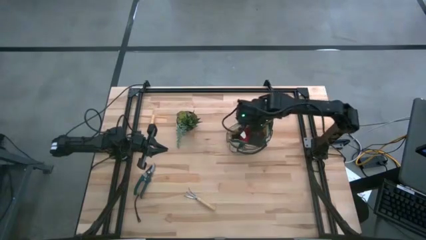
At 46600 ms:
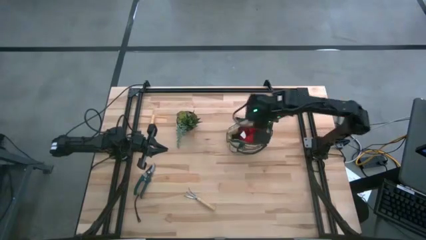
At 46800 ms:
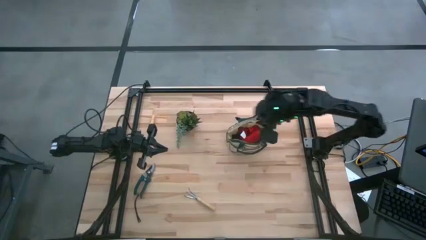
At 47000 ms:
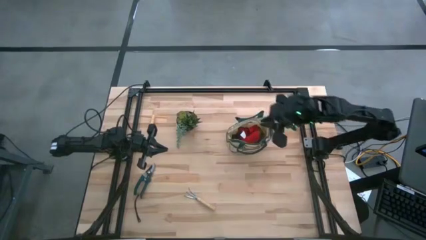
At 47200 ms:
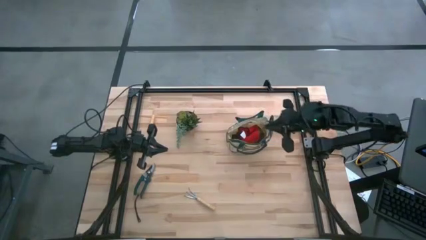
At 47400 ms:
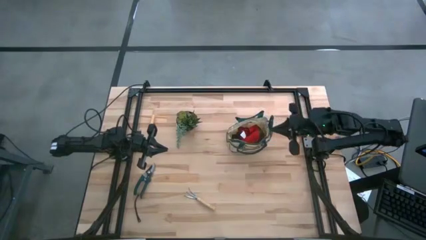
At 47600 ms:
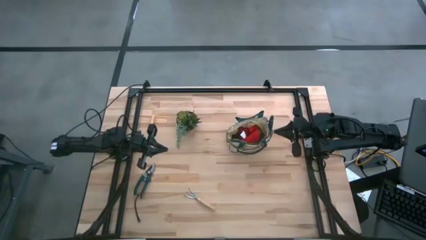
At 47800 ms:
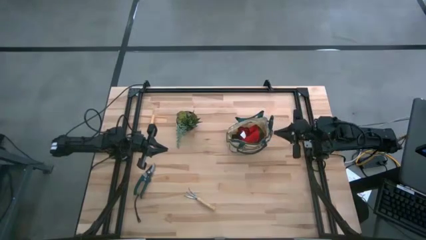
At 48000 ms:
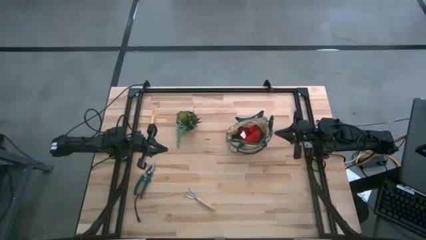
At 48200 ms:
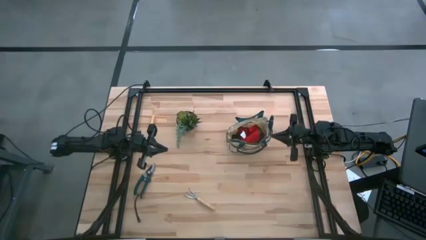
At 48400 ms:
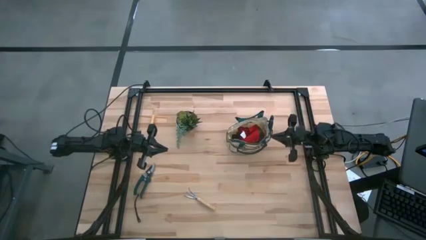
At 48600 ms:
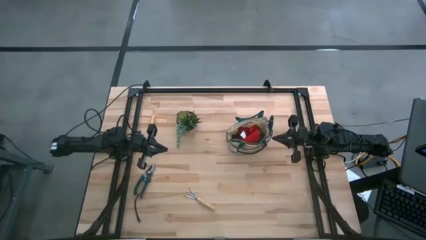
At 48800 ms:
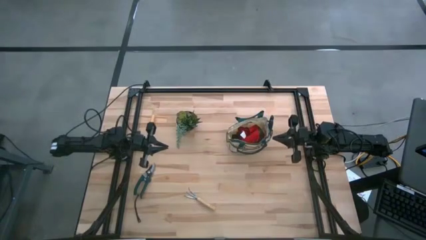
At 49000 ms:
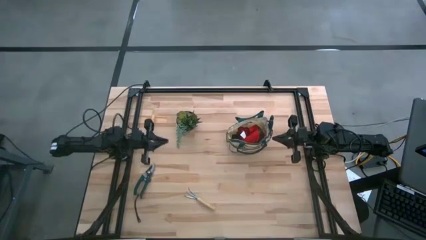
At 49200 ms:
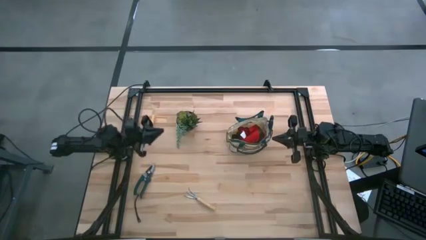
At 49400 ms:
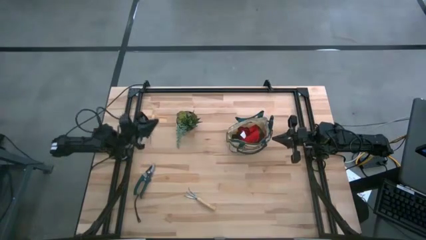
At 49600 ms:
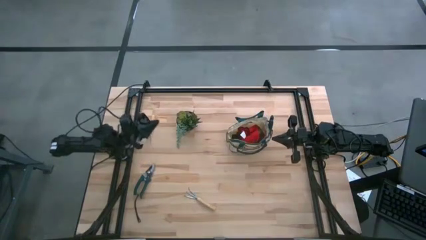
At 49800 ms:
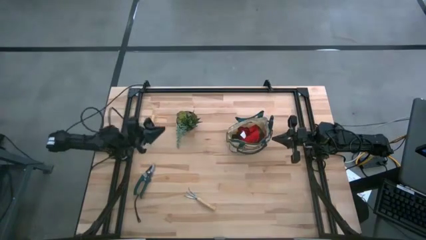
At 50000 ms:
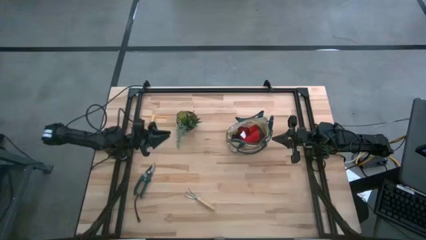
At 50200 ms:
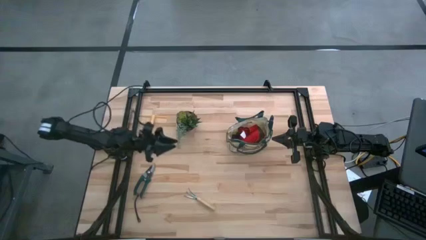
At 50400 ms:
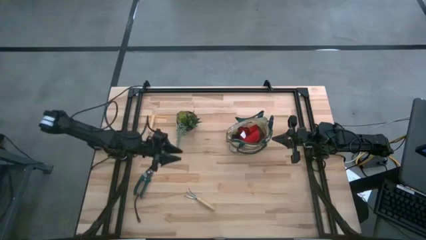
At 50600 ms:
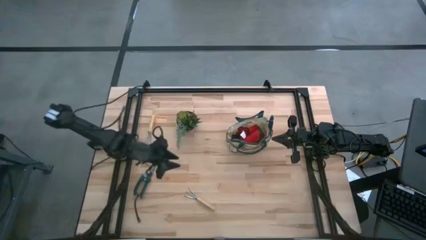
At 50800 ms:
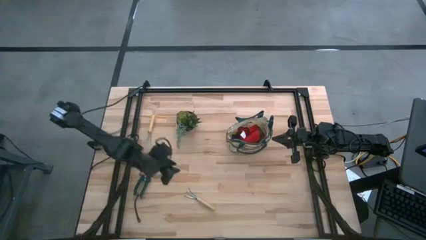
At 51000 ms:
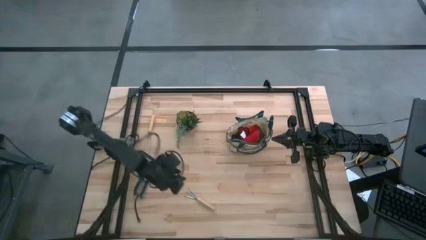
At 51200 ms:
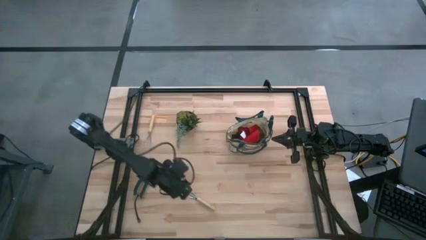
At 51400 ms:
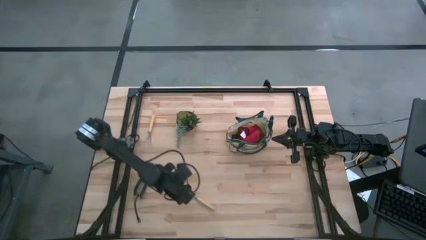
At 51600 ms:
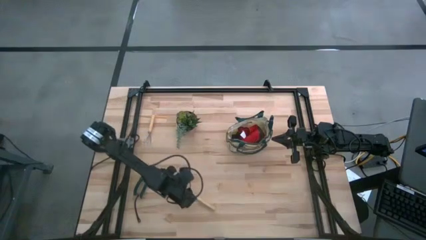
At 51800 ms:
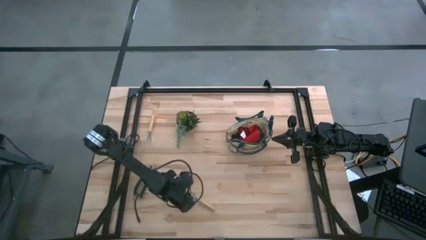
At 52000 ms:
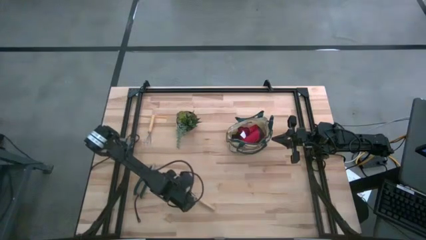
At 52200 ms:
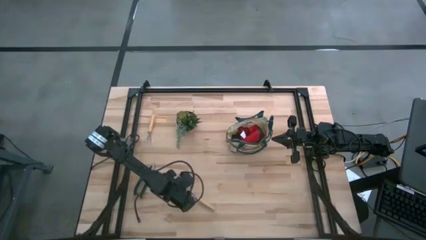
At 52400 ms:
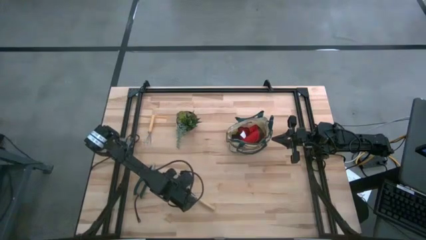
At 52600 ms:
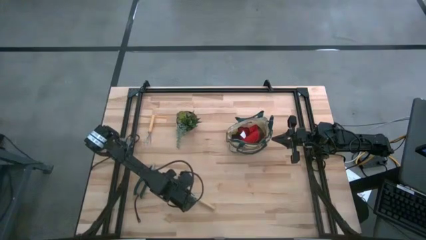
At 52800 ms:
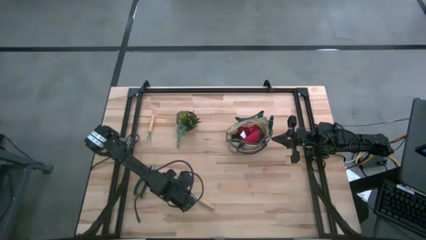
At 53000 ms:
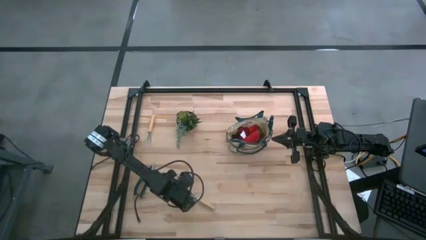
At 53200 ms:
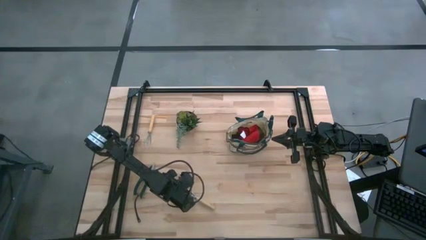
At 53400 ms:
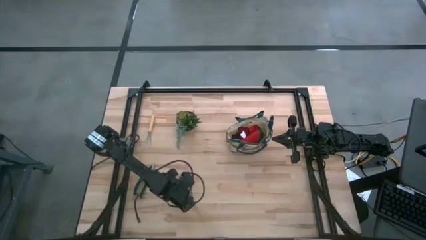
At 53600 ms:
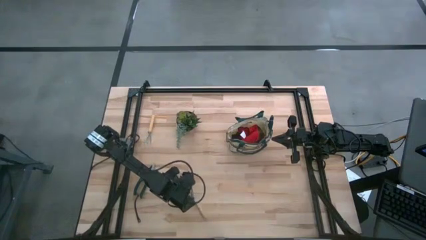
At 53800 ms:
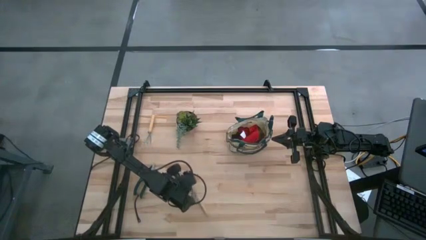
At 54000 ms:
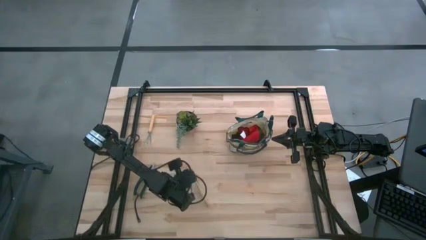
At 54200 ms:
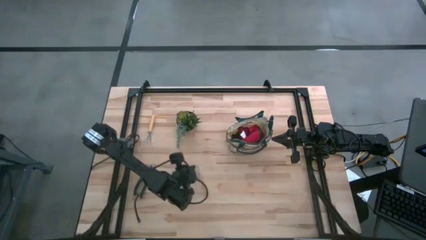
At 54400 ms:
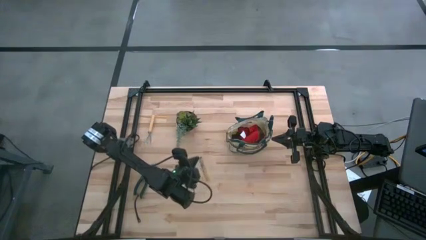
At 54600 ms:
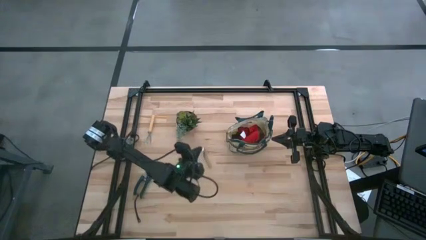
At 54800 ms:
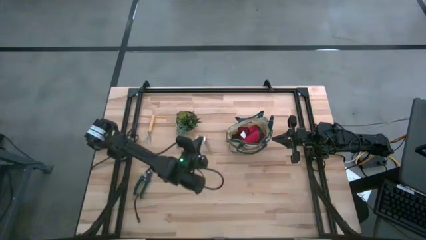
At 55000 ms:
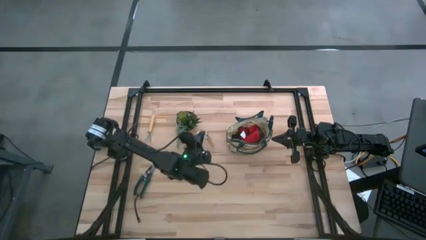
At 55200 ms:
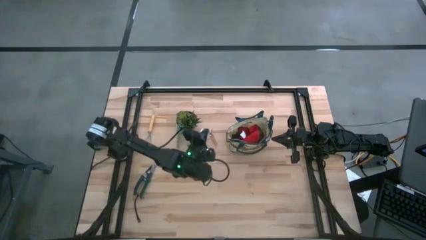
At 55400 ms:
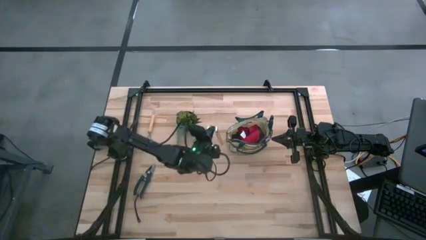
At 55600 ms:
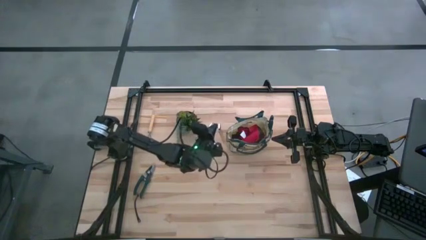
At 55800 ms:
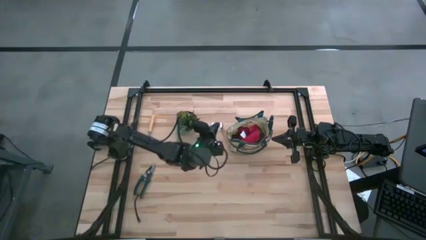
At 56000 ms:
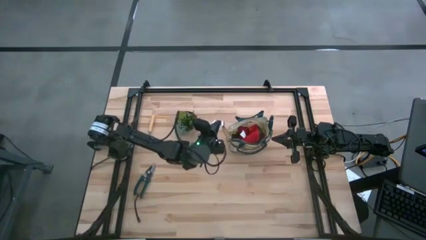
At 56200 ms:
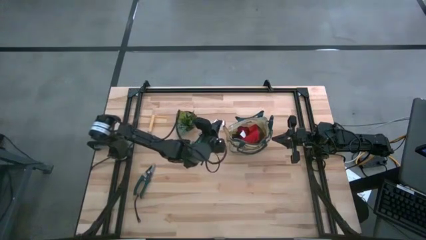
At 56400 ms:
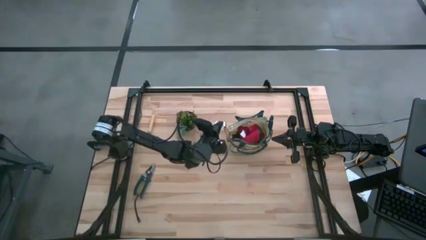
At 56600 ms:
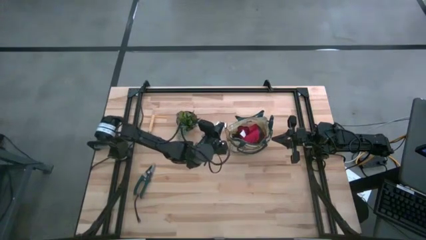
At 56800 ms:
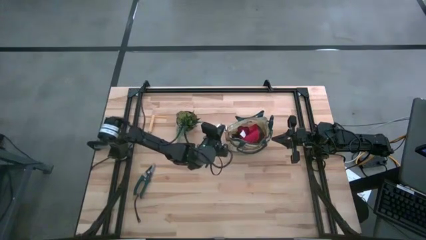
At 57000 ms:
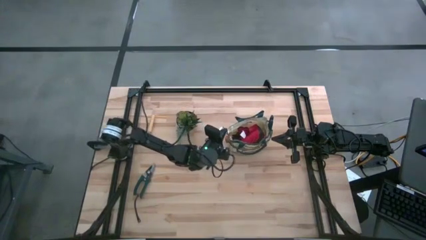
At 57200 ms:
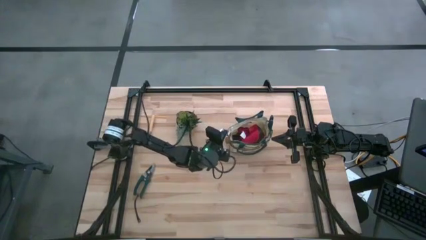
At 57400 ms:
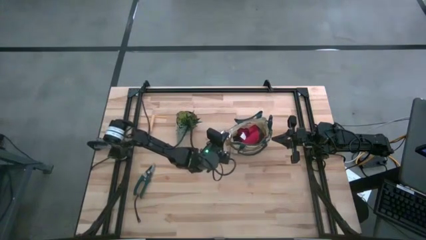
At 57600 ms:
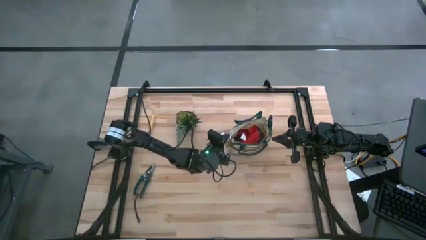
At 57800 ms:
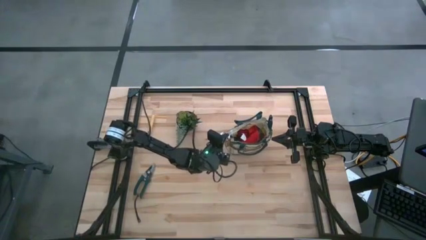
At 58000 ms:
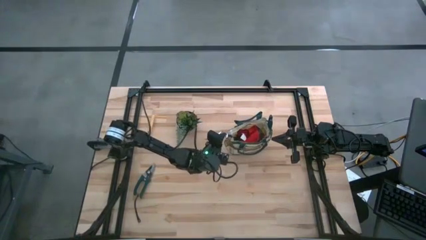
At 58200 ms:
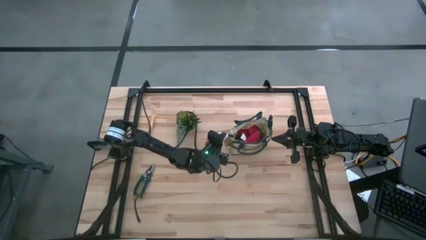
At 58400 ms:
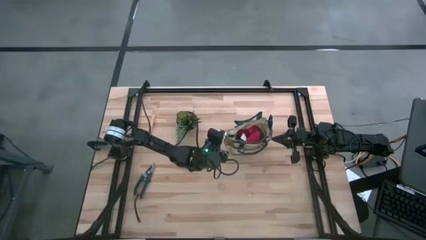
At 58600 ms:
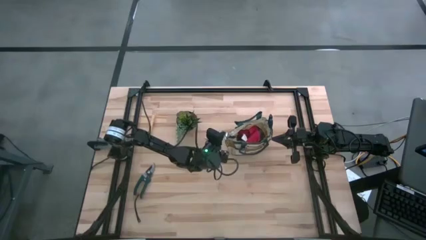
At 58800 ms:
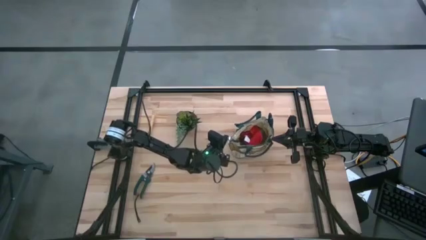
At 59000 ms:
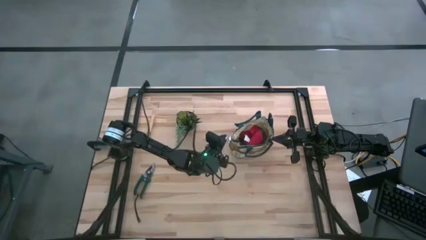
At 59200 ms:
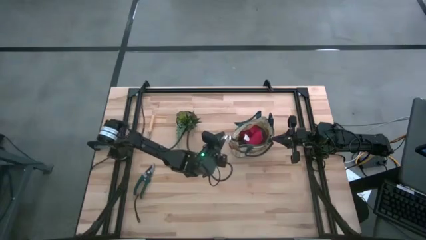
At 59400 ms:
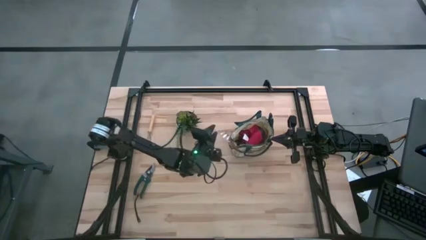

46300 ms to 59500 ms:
Task: Pick & Place Garden tools in Gardening bag
Put the bottom brown hand rake into the gardening bag

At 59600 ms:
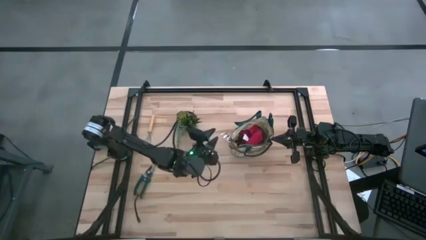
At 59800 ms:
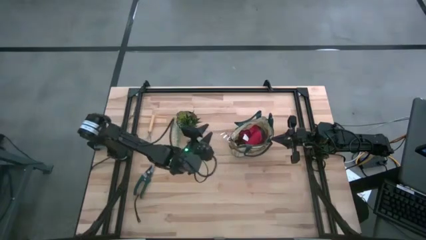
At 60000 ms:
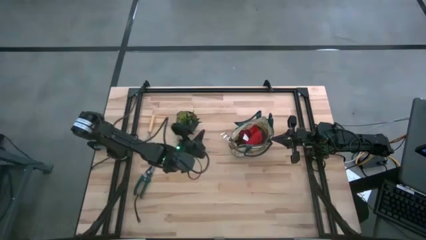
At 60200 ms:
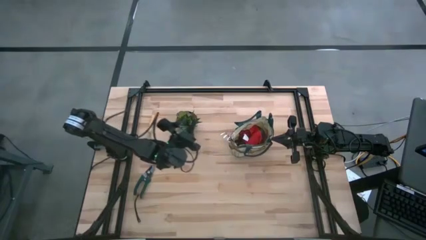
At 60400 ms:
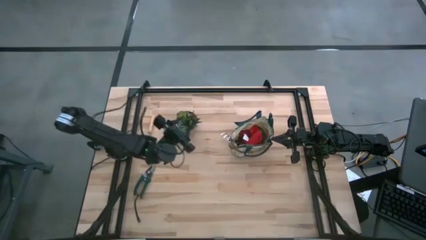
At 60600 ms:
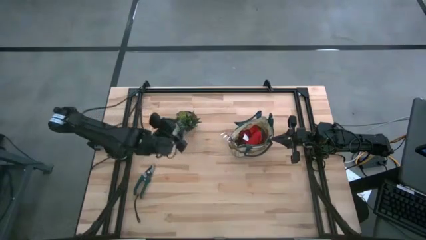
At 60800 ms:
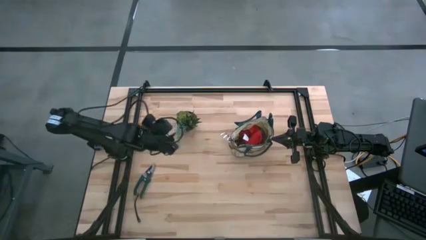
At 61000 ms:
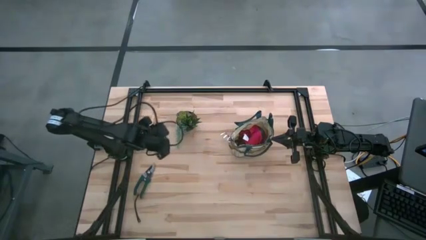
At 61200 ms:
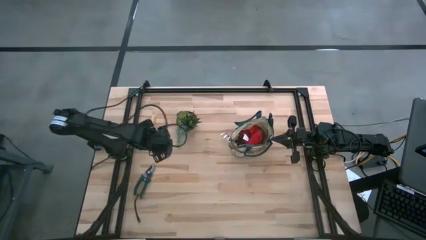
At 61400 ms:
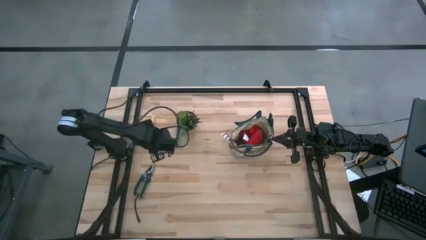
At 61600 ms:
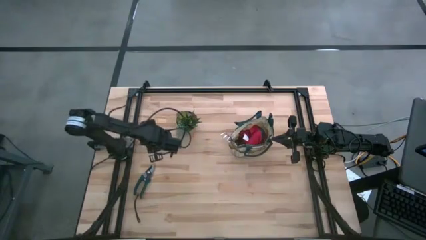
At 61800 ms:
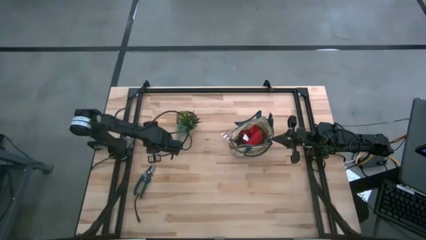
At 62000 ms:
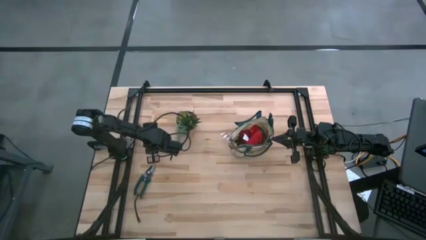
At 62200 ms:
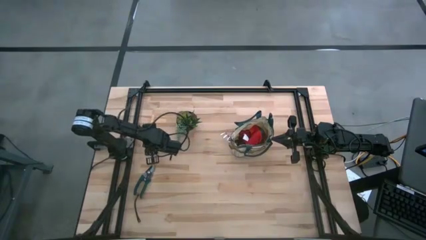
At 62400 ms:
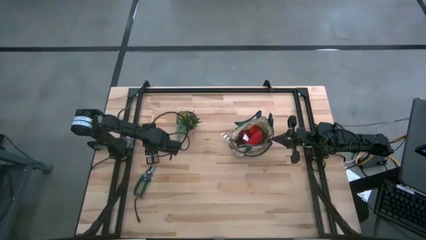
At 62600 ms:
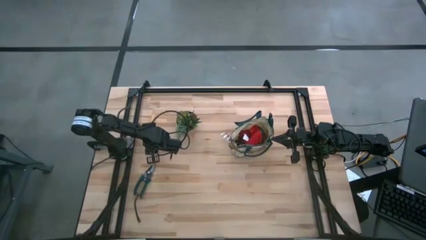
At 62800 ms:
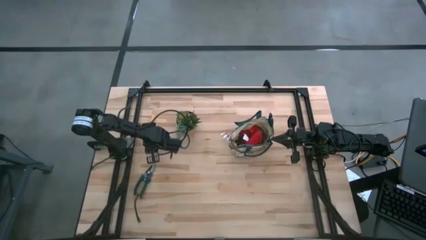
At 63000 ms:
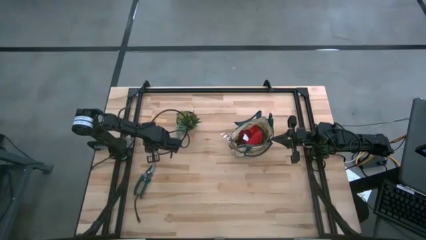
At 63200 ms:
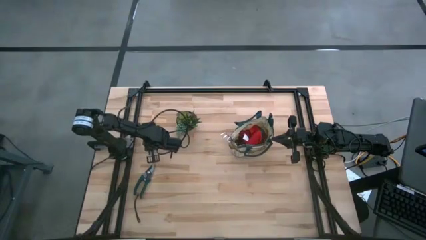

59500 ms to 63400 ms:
Put the brown hand rake into the gardening bag
